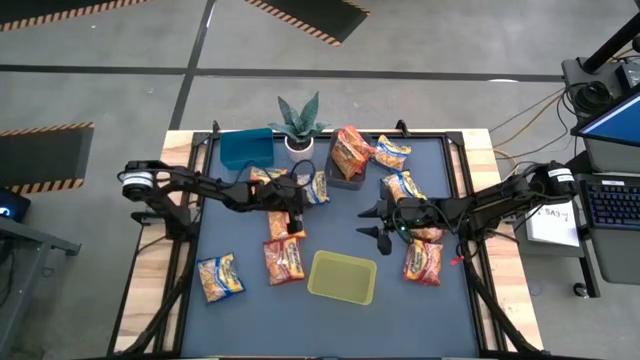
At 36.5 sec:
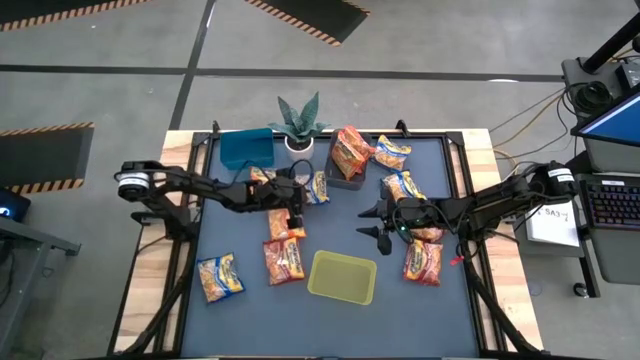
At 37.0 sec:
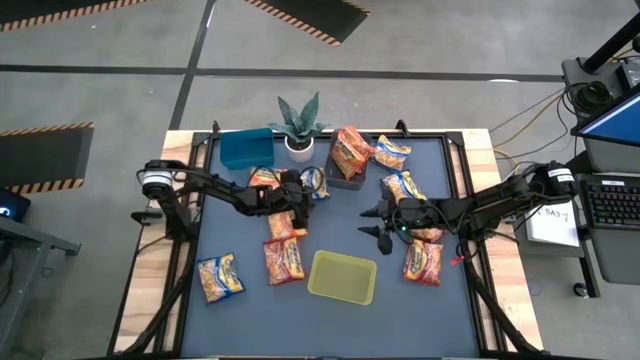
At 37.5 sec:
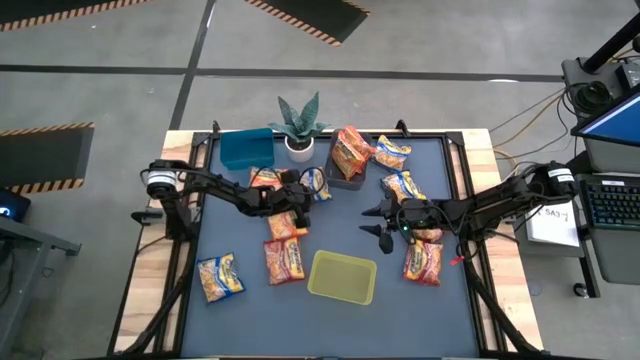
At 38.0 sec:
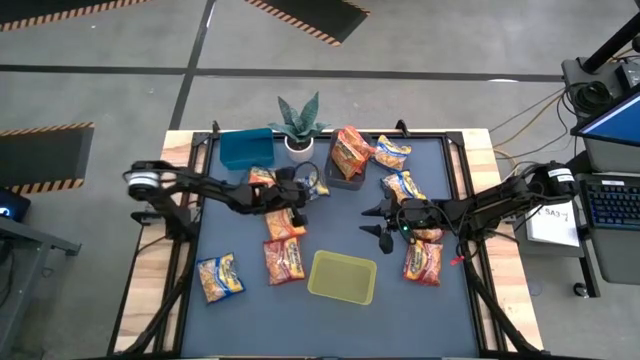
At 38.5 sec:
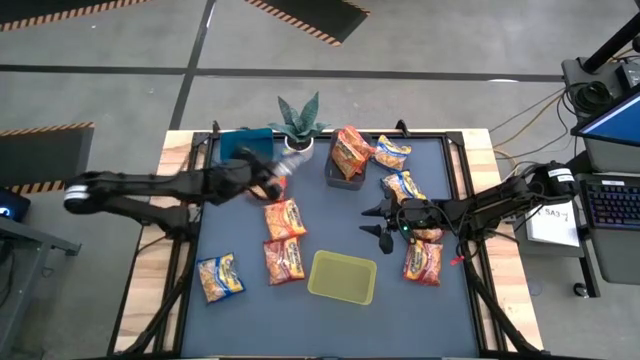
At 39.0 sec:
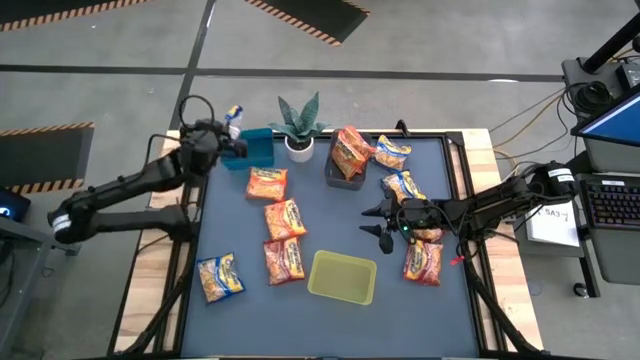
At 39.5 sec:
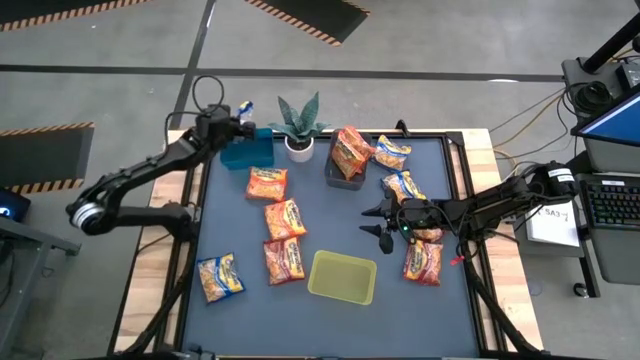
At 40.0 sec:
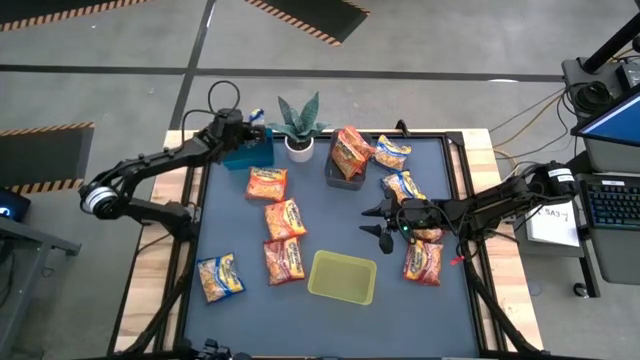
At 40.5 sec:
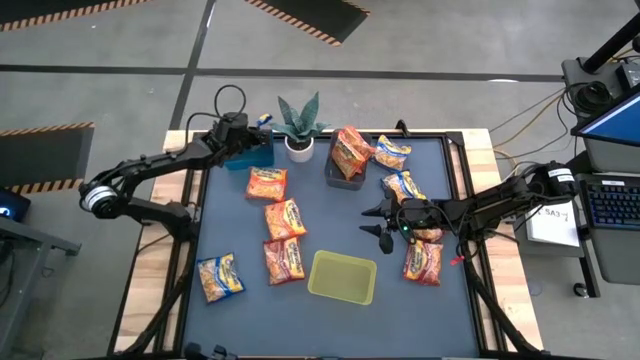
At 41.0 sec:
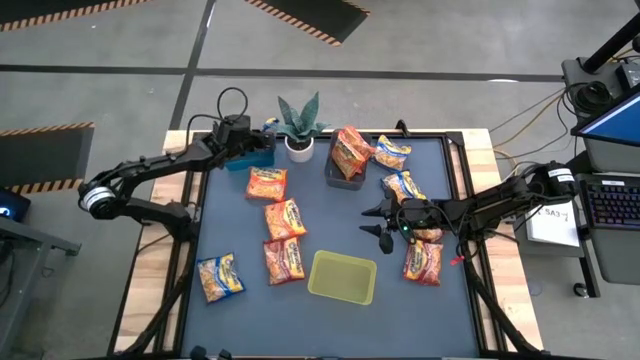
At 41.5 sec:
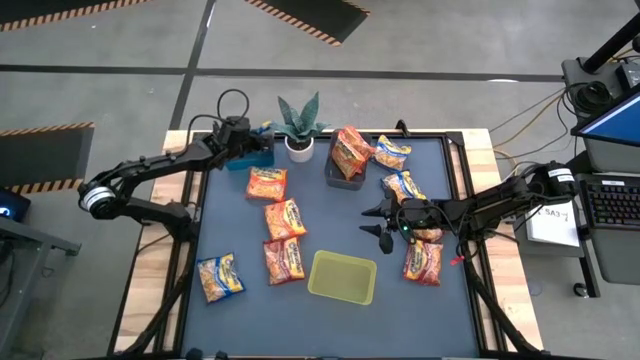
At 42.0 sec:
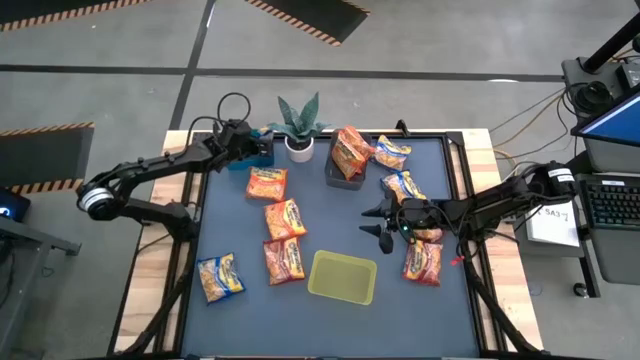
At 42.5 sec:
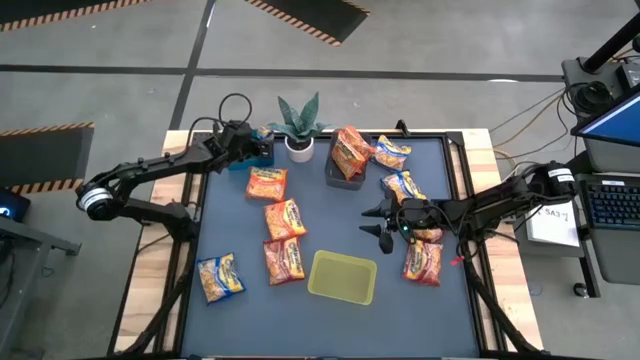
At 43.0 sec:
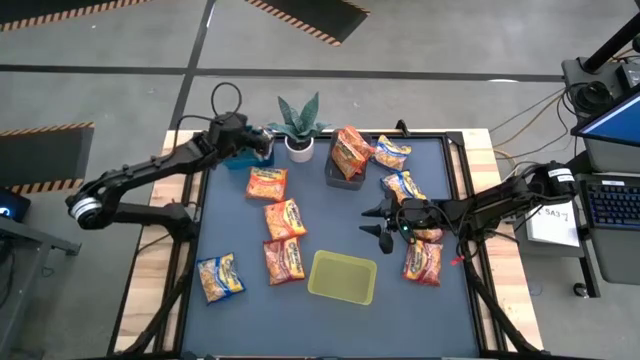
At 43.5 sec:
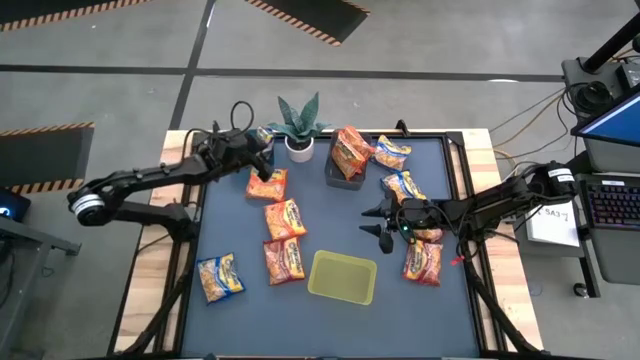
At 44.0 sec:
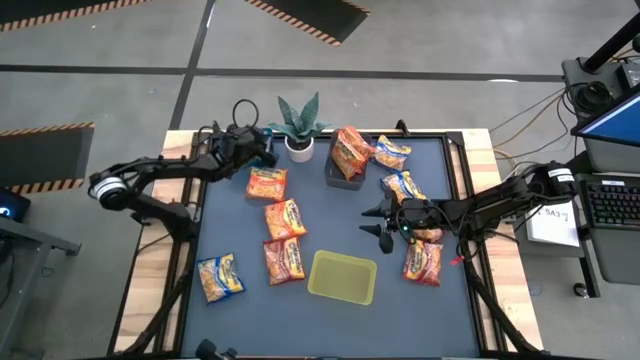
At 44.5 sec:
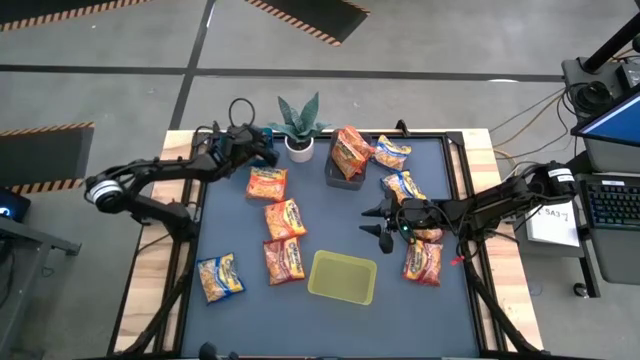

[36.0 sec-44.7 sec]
Task: Sort Maruchan noodles
Put the top blue bag into the blue bin

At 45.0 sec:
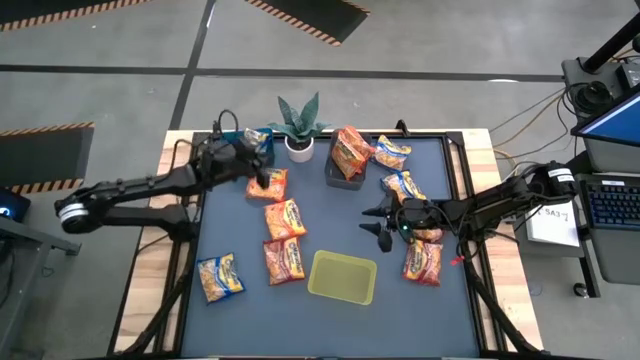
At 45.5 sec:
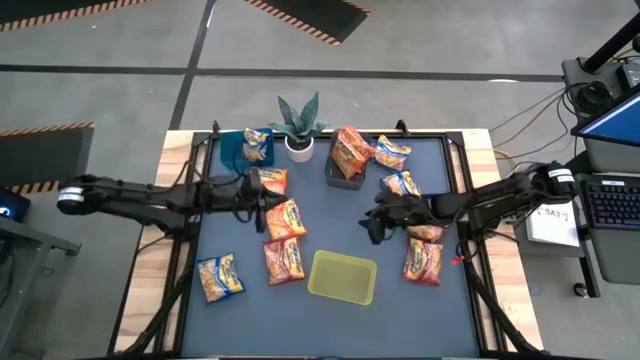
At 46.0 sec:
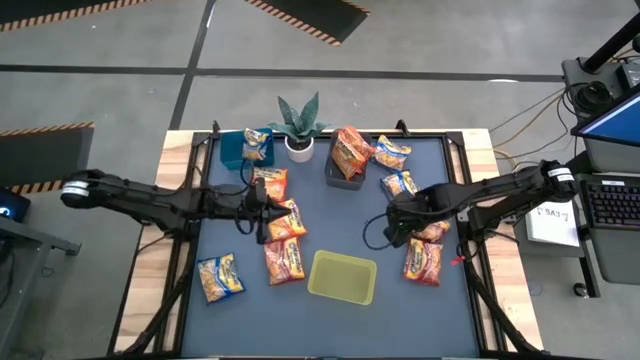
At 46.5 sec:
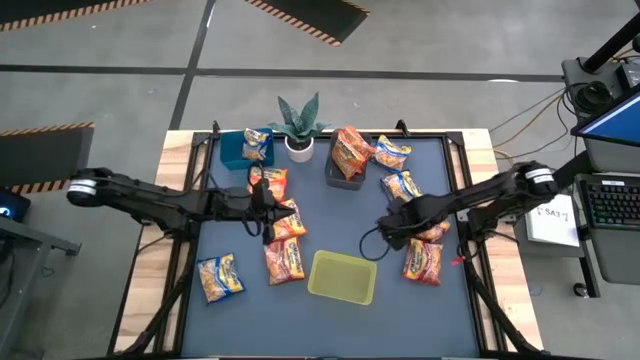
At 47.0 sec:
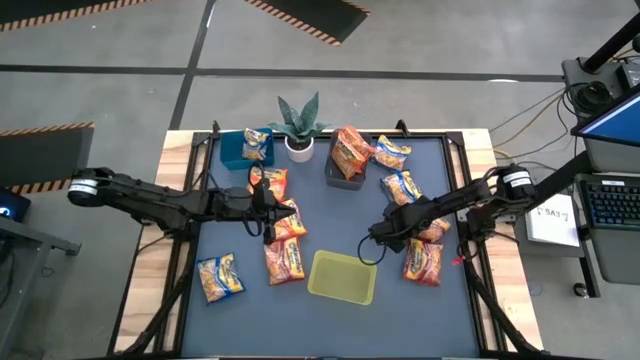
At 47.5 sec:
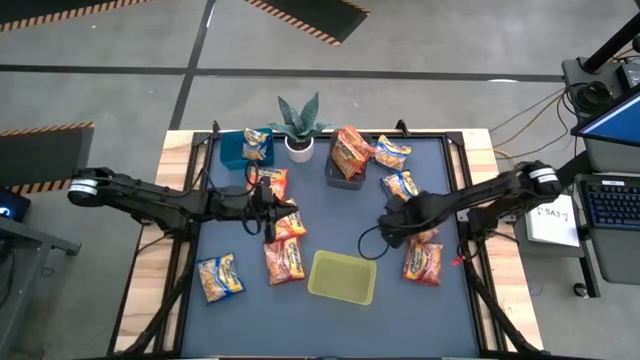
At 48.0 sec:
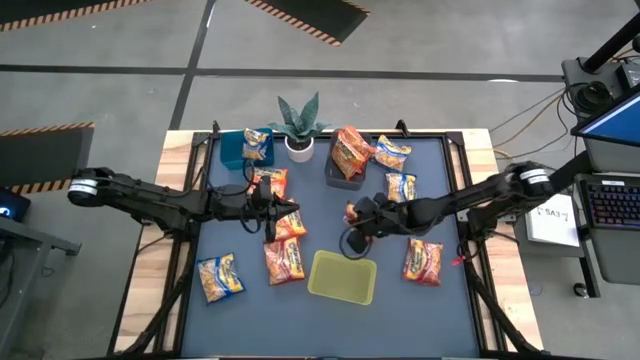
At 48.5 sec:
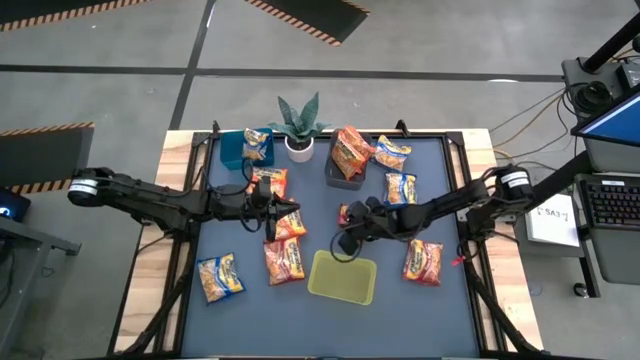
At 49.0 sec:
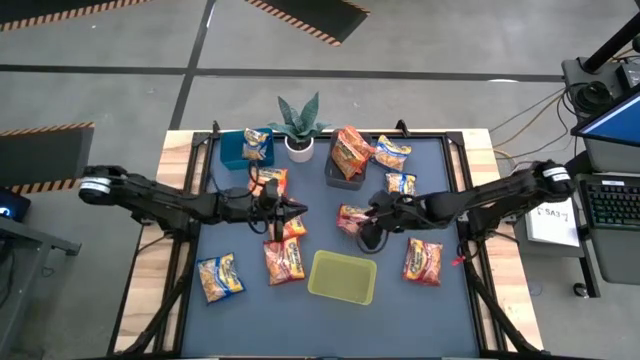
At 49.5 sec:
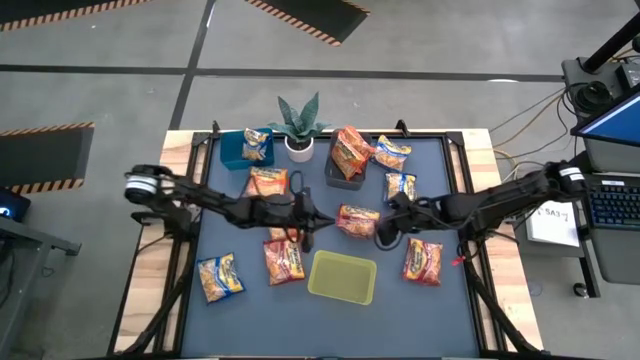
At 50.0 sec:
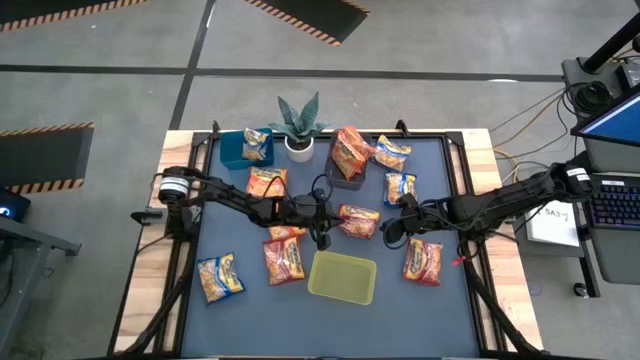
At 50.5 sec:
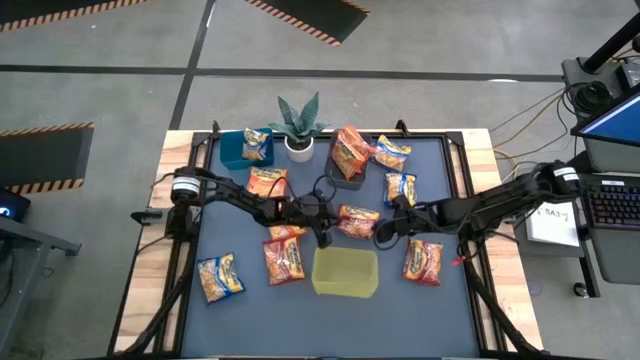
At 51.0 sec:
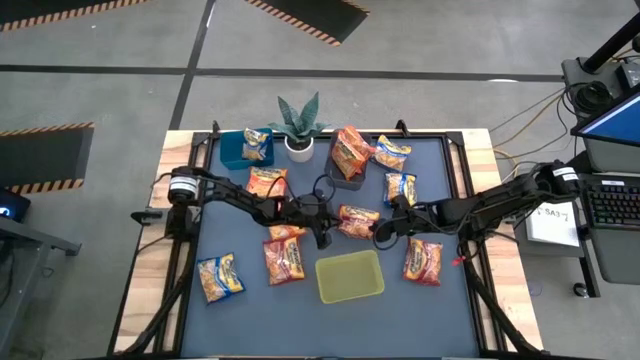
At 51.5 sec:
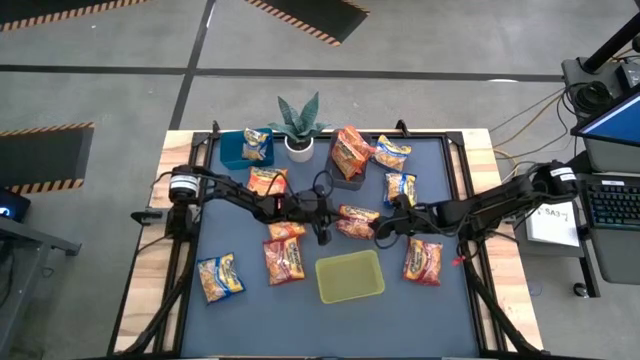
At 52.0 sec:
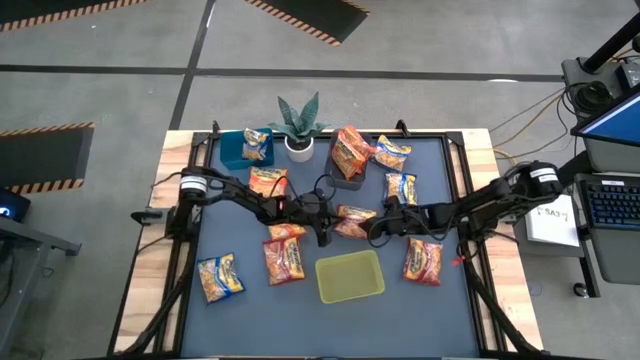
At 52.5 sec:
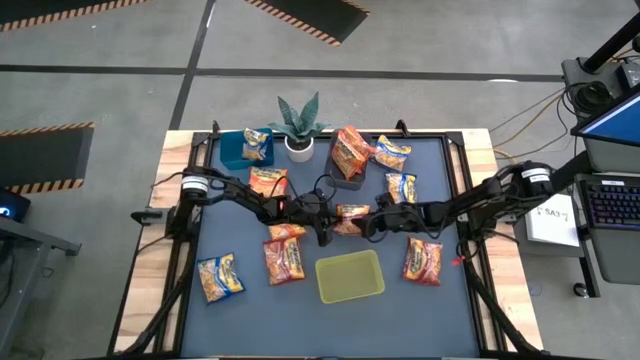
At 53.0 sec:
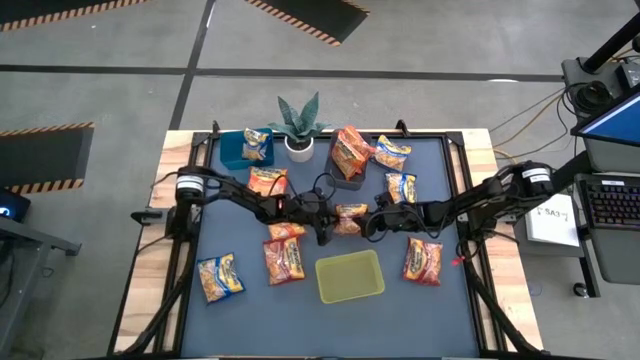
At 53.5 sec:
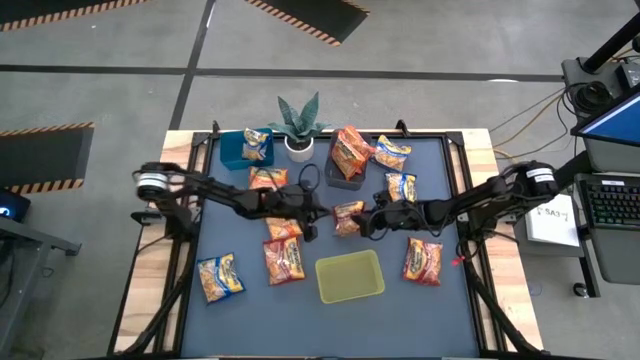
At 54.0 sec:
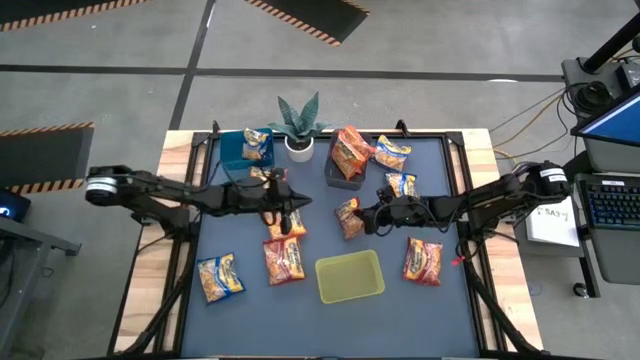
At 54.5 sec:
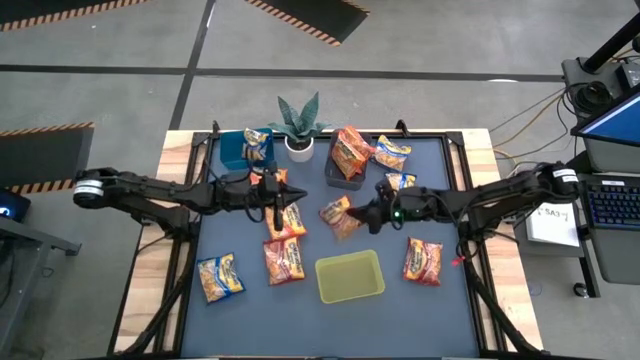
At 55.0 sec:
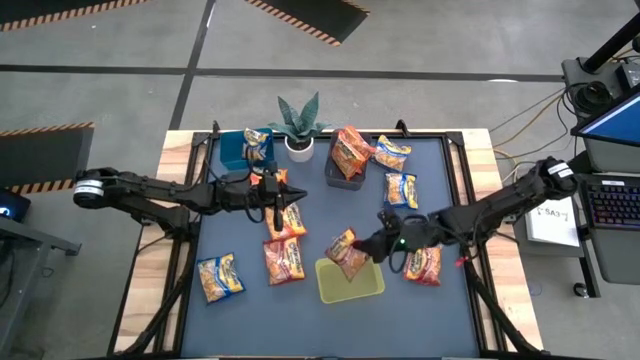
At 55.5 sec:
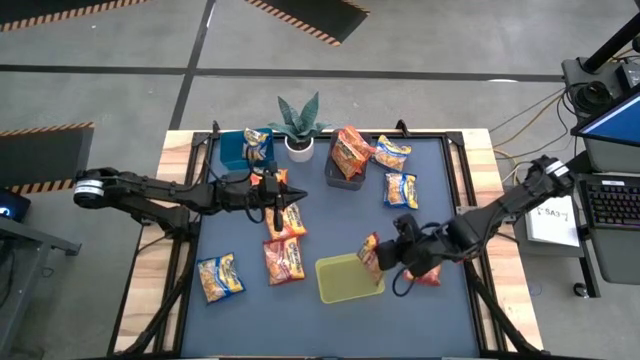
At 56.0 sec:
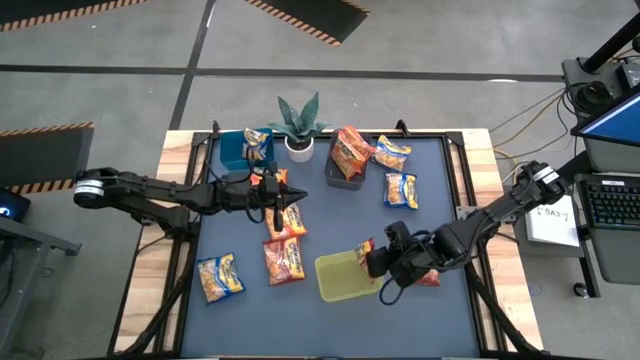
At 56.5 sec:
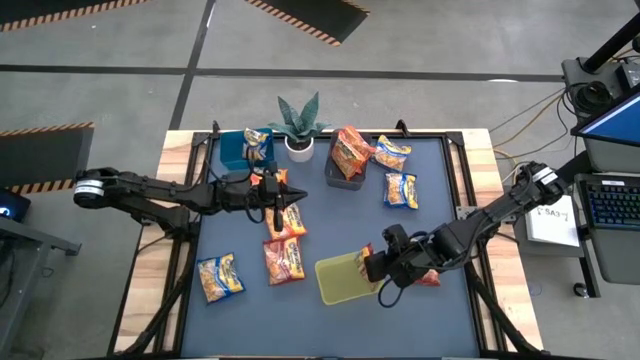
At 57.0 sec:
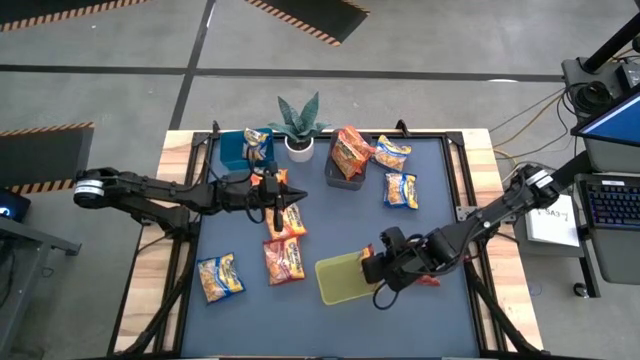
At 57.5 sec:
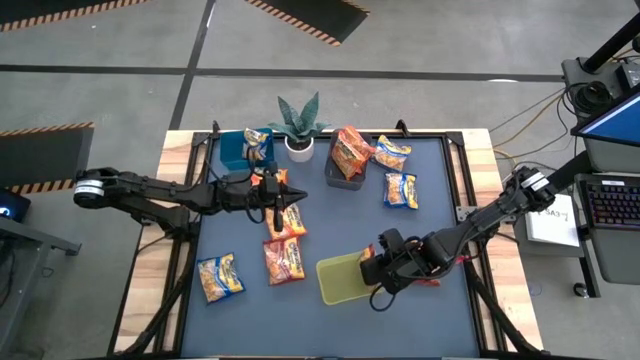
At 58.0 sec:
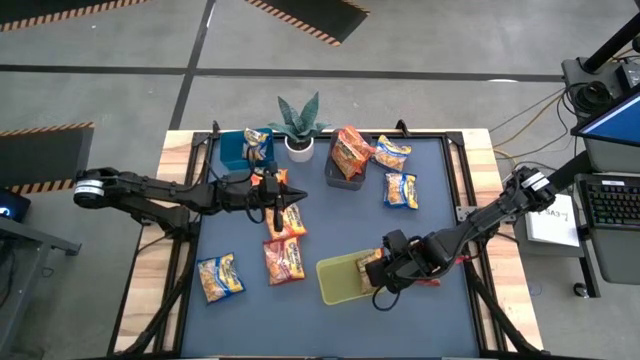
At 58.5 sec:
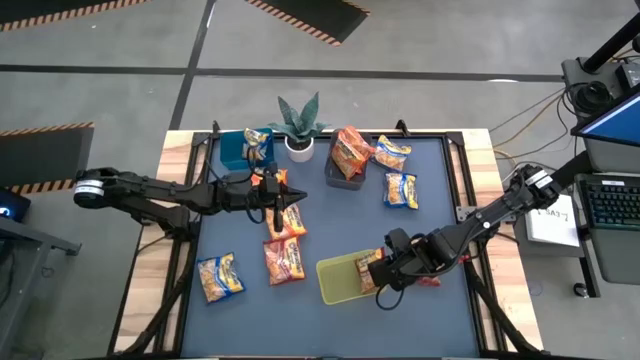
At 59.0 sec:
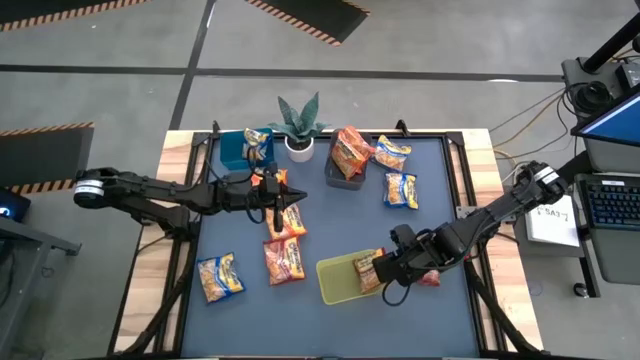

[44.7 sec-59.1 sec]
Put the red bag into the yellow bin
